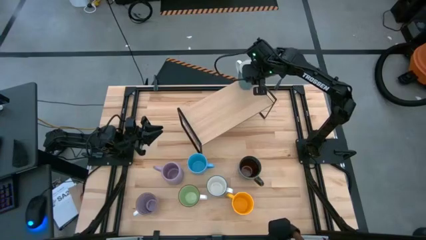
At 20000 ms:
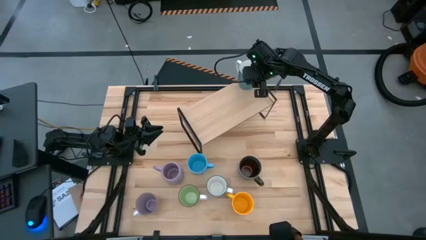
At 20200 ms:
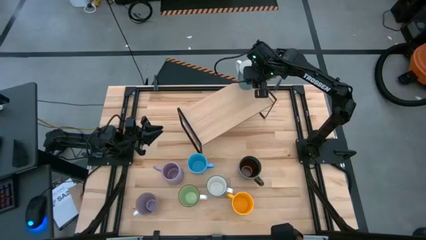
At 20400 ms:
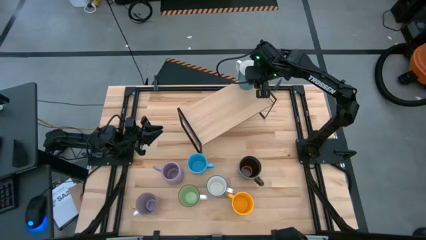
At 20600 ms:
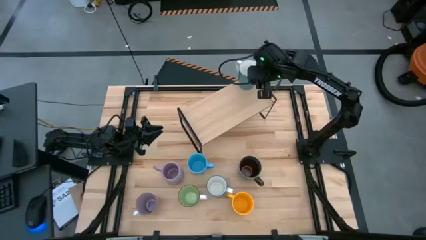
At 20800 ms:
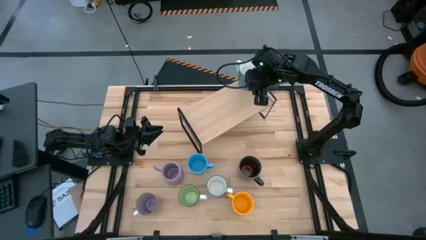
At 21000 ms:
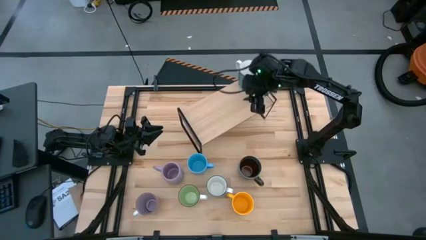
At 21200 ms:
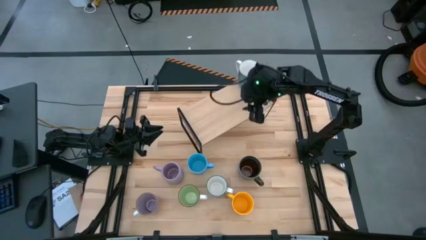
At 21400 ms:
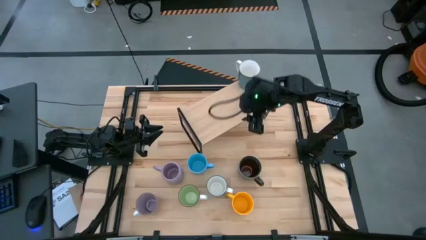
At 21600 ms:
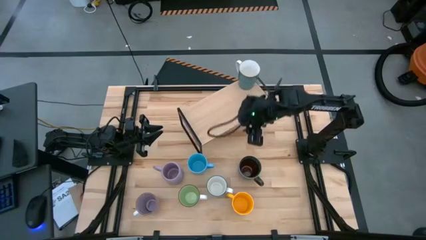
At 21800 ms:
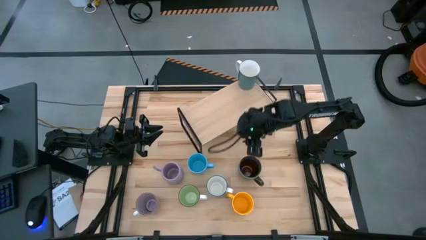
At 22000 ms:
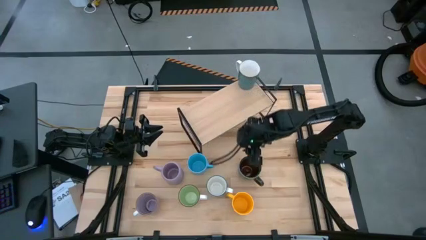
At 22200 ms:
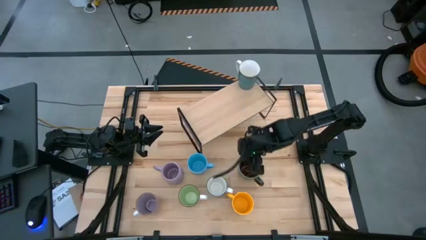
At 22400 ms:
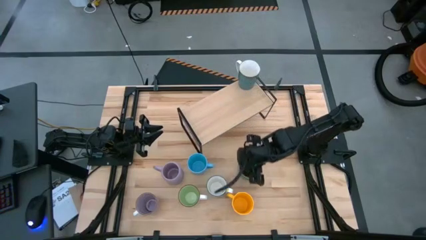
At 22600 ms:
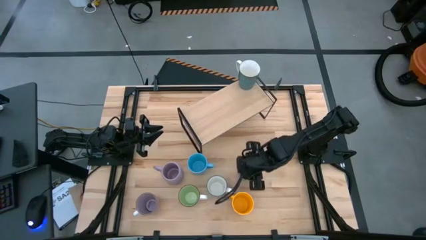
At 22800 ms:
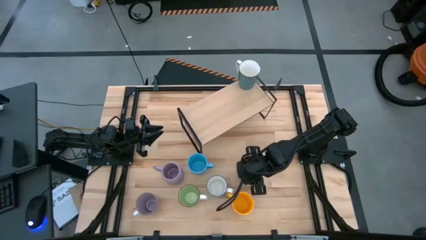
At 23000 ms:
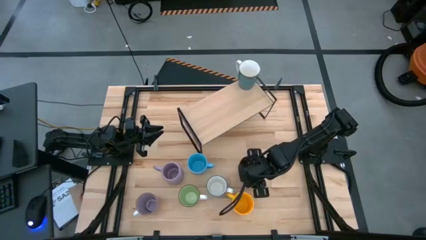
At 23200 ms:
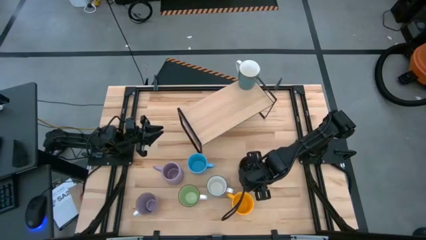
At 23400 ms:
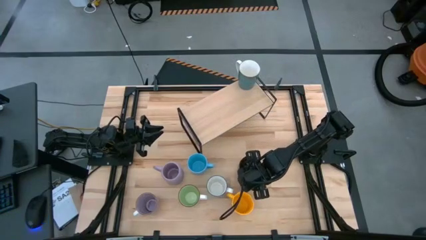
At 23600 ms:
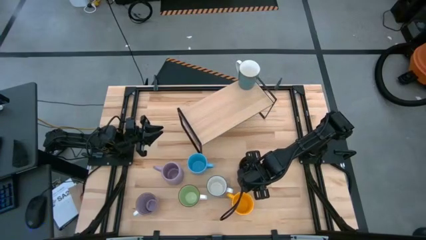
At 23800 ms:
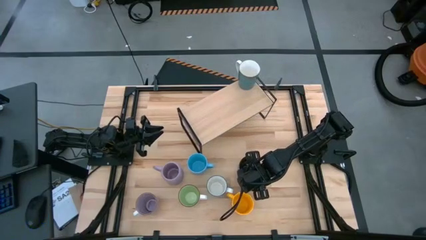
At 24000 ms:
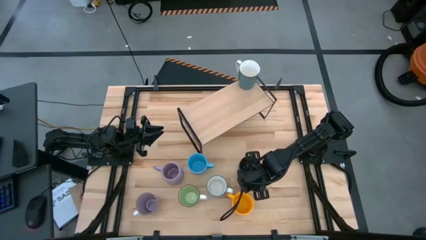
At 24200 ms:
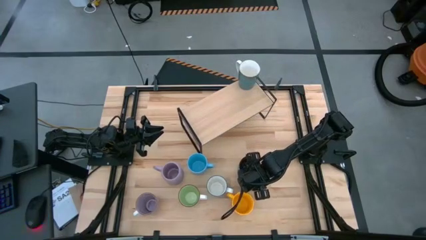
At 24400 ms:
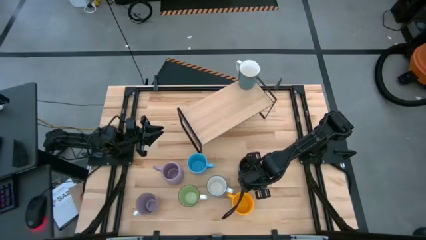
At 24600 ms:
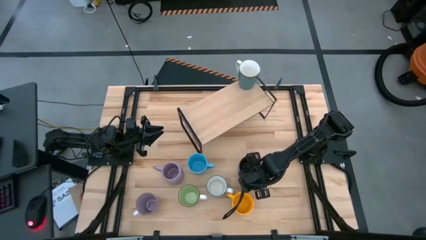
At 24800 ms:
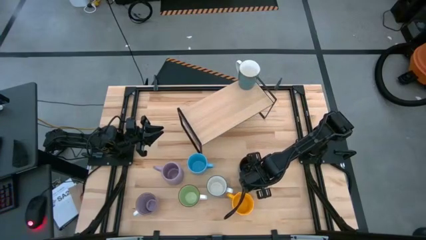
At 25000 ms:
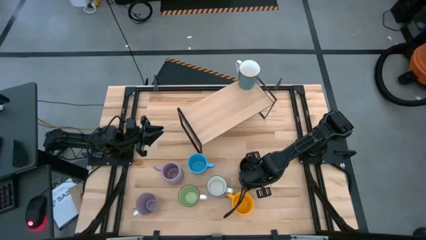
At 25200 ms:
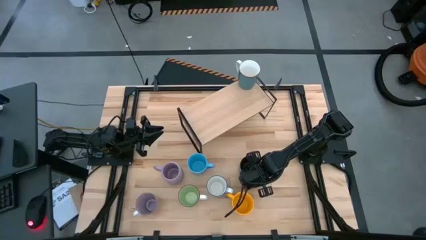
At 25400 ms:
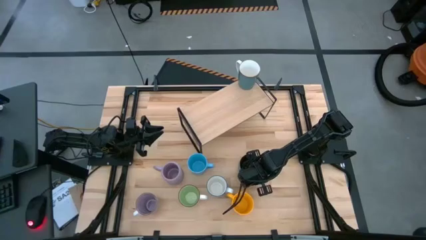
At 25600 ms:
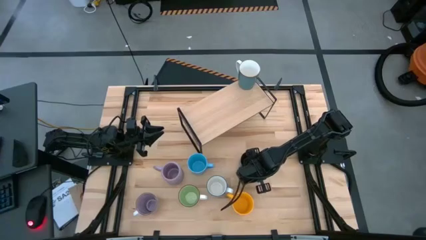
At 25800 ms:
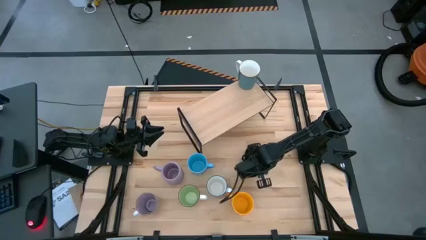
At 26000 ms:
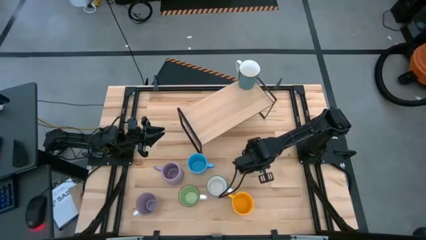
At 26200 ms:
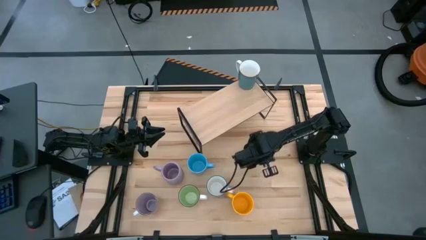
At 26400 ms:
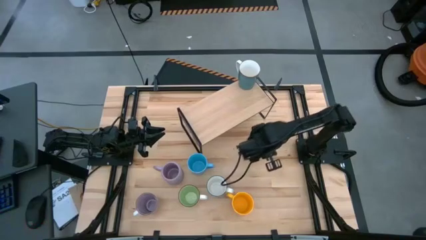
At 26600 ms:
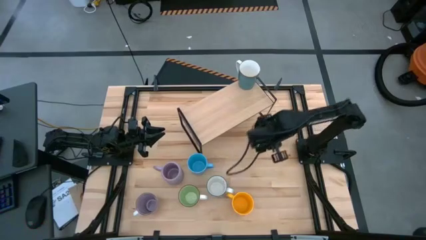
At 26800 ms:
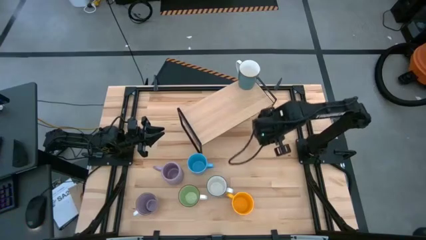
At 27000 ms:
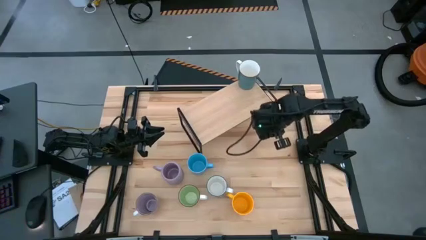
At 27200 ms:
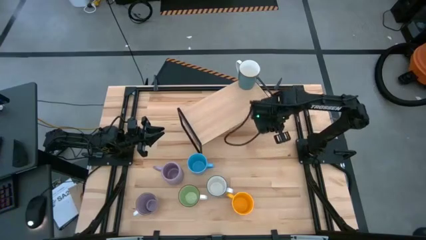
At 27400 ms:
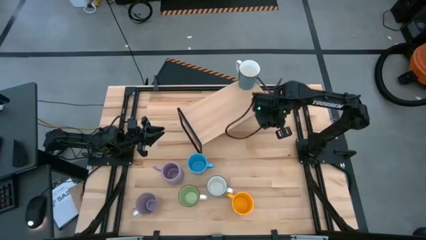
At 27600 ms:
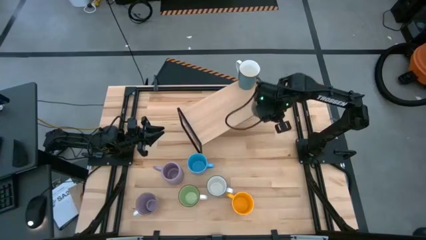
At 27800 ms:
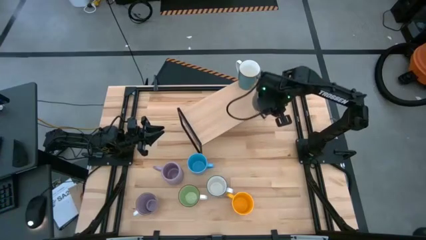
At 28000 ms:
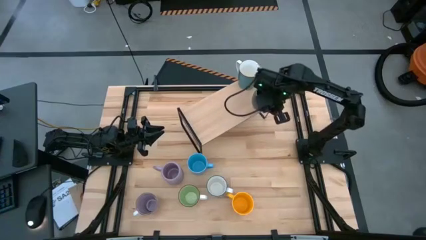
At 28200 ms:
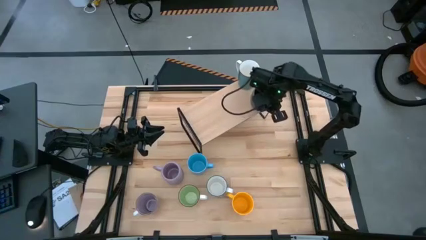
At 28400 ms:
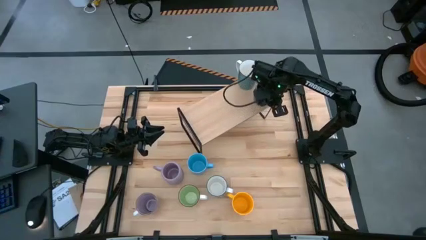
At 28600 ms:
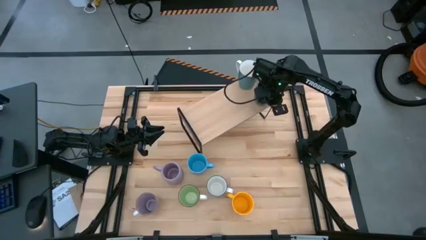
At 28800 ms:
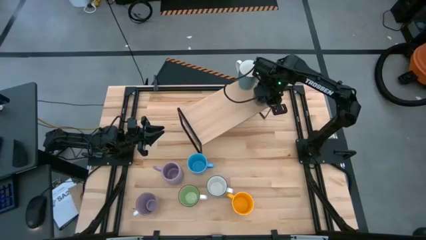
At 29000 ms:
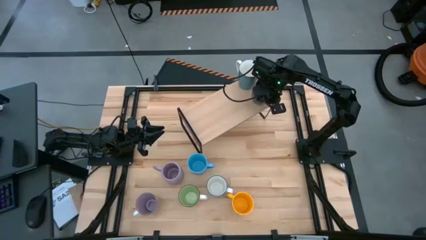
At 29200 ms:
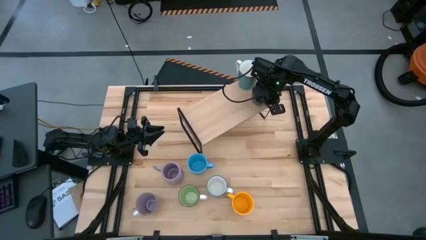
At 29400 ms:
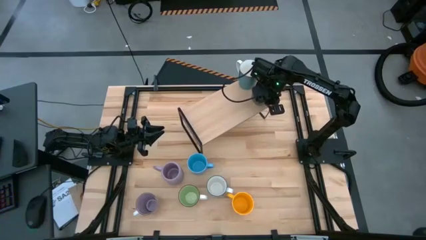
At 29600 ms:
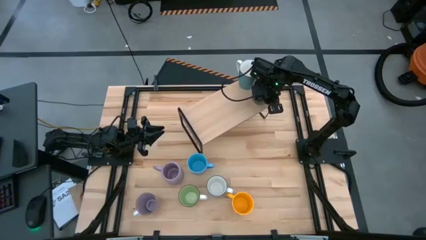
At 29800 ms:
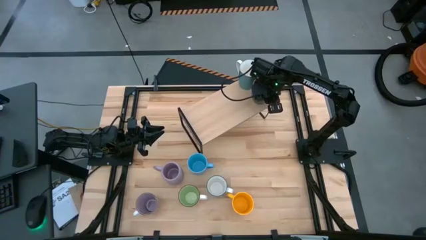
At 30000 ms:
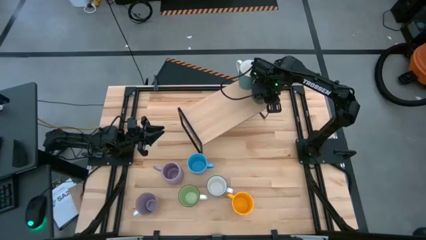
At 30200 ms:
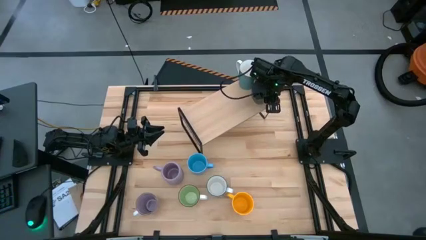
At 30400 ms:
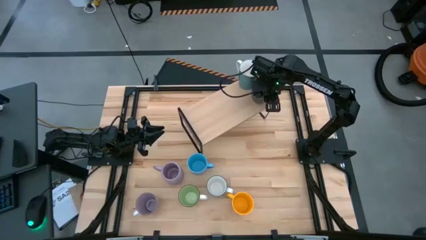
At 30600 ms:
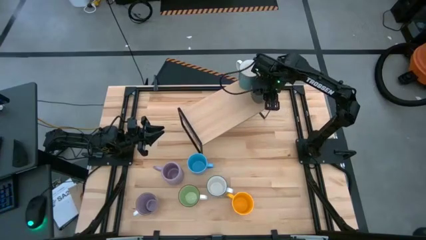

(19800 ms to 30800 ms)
Task: Place coffee mugs
Put the dark green mug on the shelf

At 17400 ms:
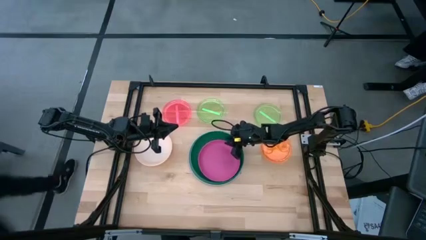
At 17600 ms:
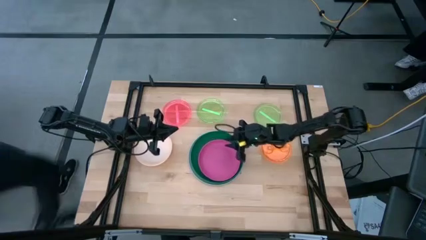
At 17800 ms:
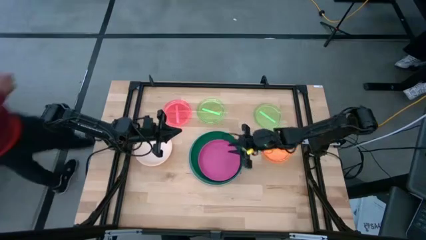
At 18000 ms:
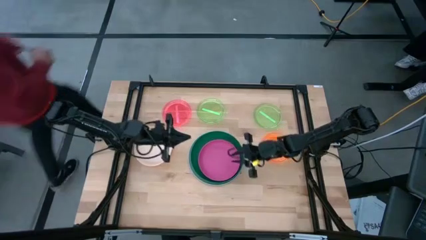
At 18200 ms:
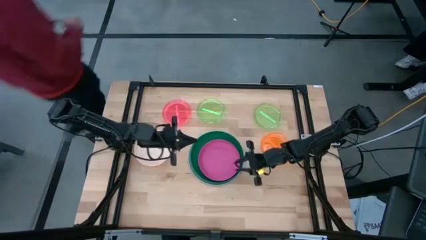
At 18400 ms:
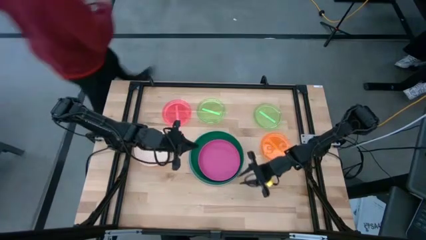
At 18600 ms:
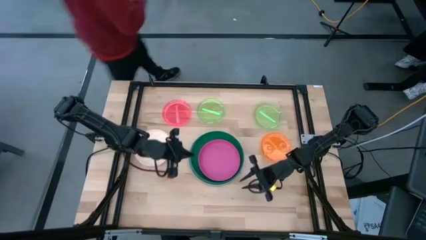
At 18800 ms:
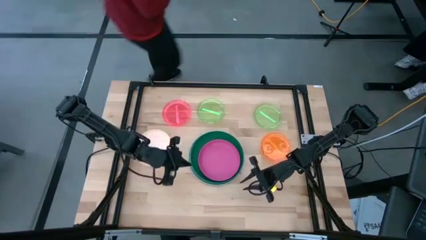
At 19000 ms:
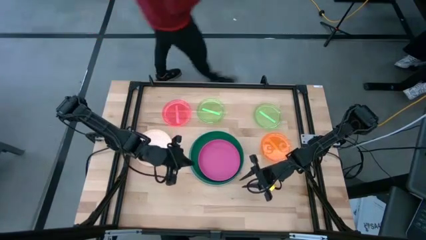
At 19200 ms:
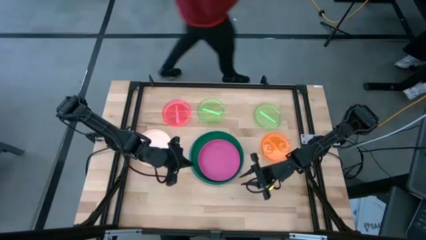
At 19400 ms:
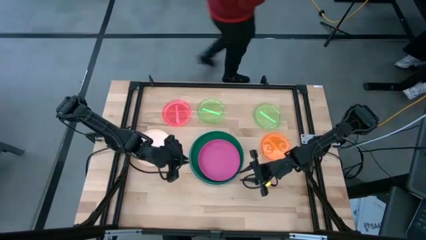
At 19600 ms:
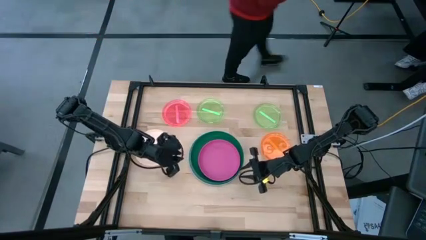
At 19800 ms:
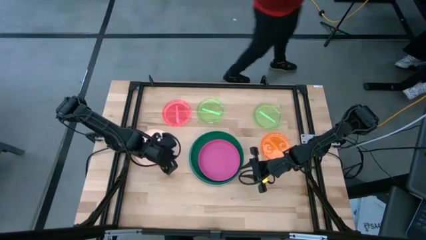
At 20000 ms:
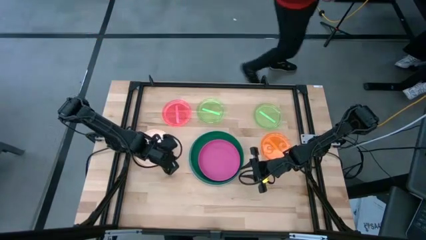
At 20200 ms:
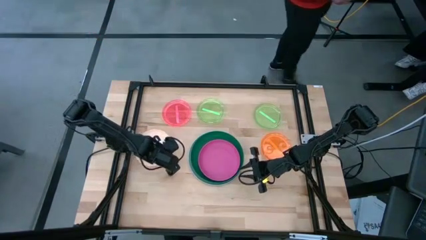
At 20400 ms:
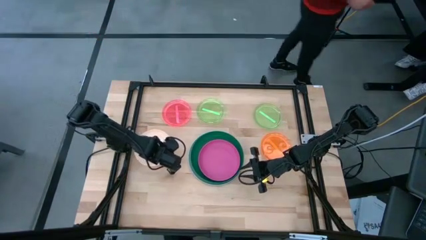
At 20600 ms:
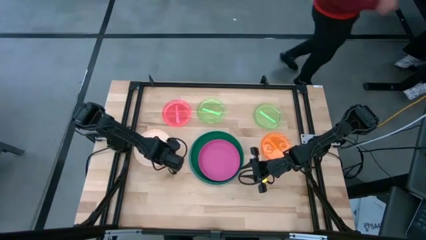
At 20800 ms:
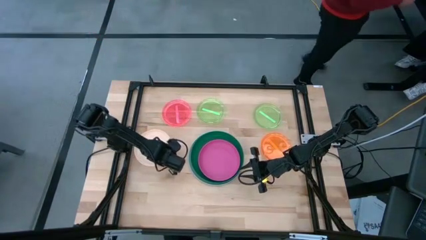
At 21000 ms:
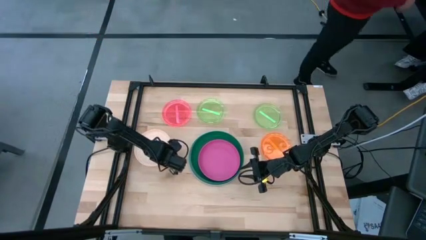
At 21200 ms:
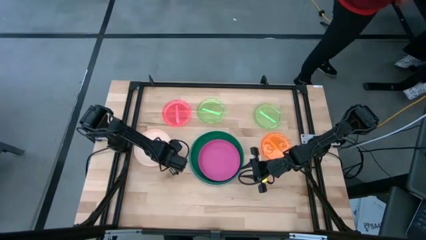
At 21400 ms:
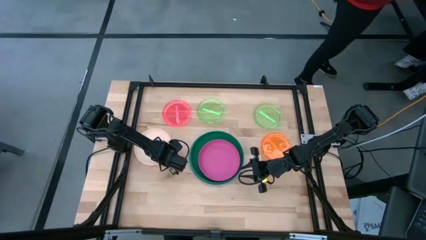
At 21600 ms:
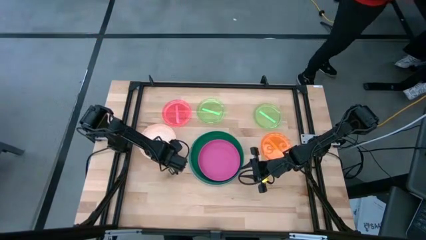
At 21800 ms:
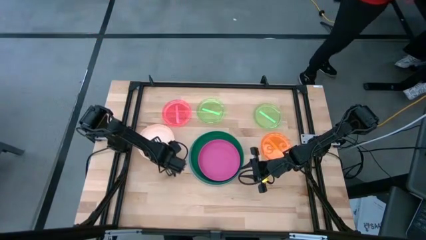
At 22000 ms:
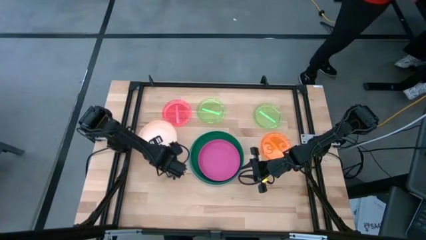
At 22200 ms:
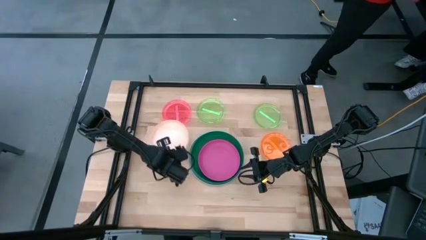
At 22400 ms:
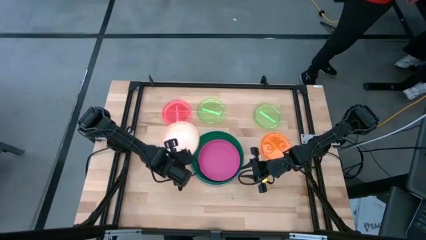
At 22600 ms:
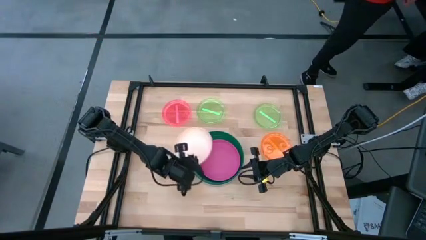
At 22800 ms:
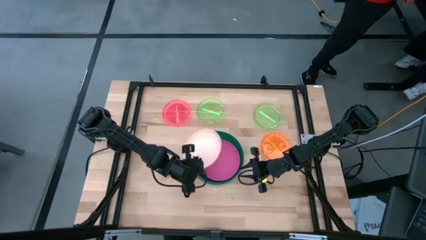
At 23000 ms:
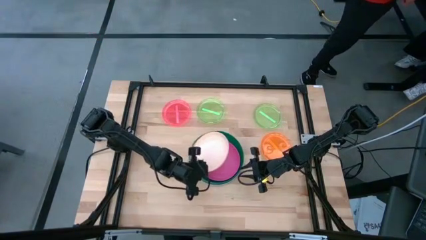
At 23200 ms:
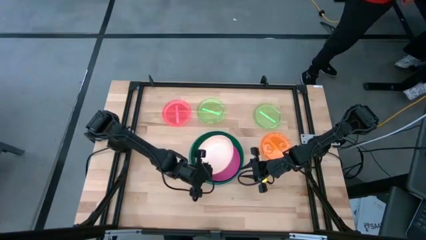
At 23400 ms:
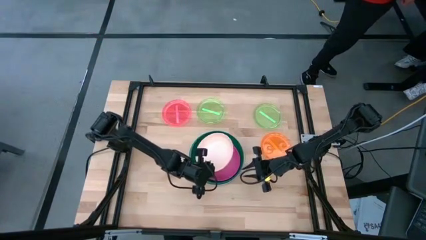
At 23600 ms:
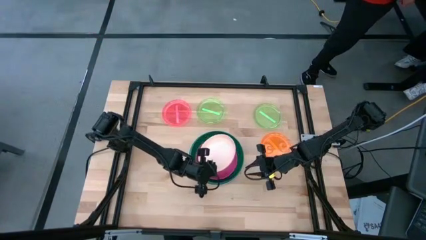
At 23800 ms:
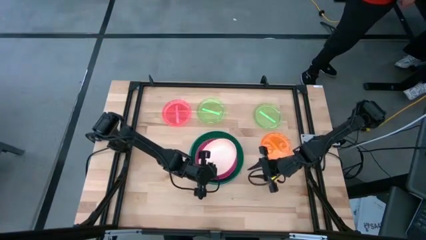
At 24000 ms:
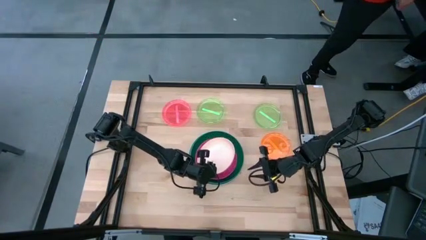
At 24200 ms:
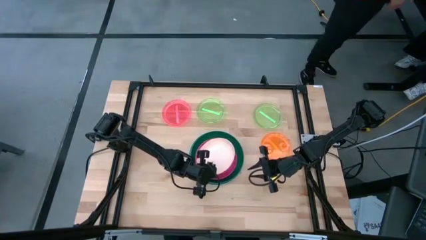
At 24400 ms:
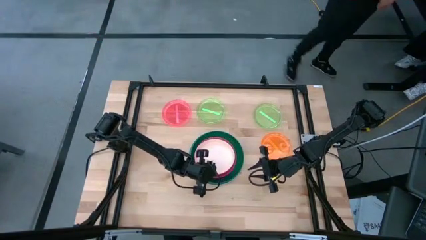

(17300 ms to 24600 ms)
Task: Stack plastic plates
Stack the light orange plate on top of the pink plate
